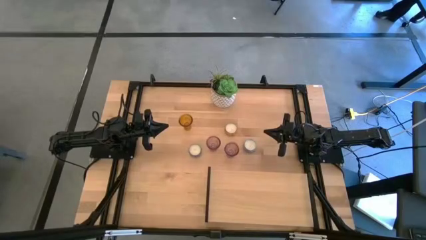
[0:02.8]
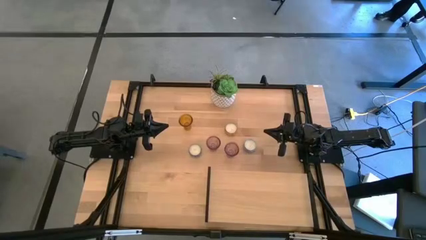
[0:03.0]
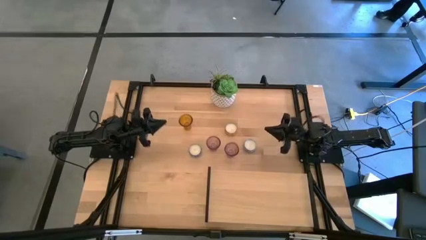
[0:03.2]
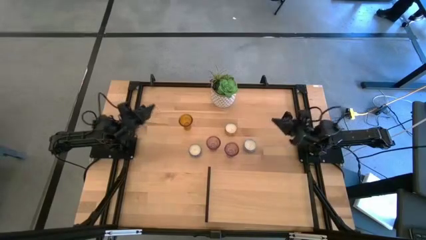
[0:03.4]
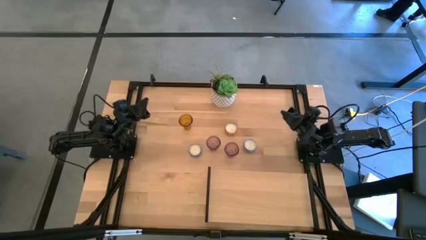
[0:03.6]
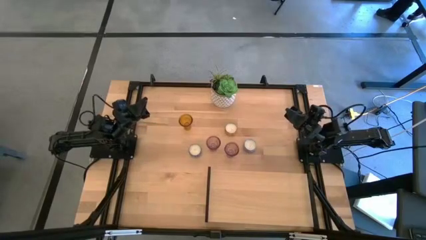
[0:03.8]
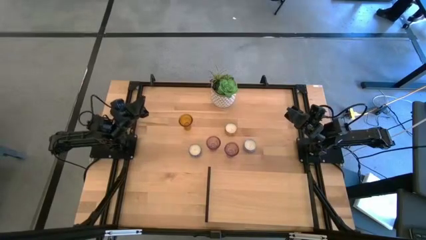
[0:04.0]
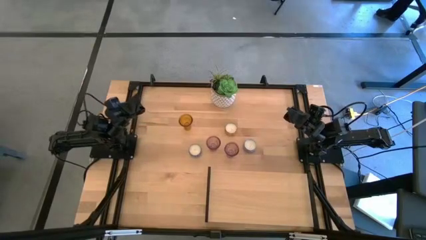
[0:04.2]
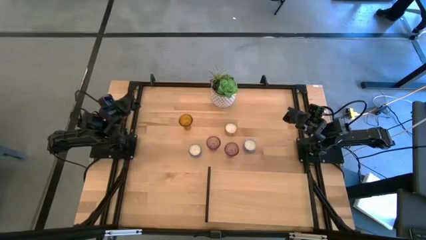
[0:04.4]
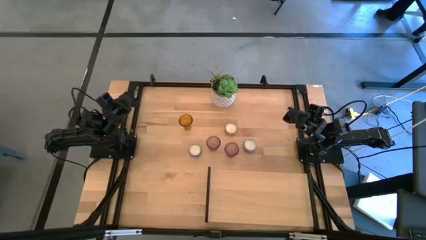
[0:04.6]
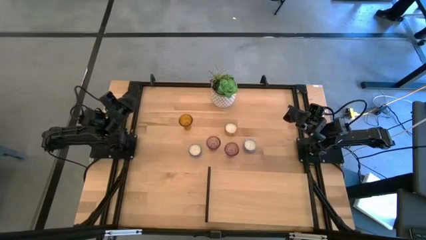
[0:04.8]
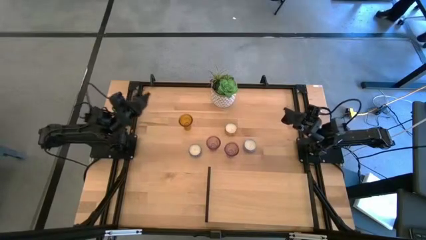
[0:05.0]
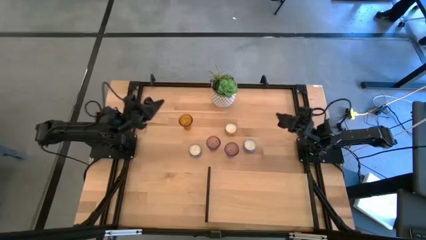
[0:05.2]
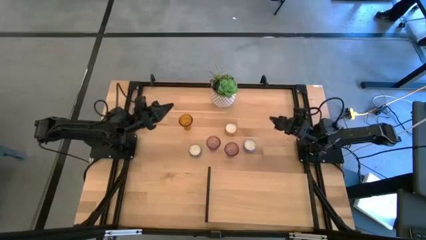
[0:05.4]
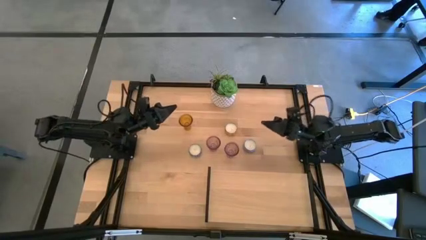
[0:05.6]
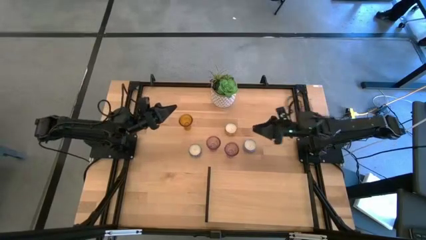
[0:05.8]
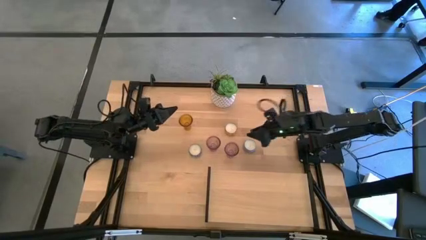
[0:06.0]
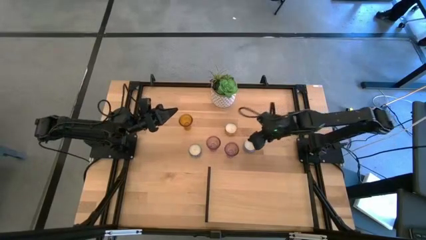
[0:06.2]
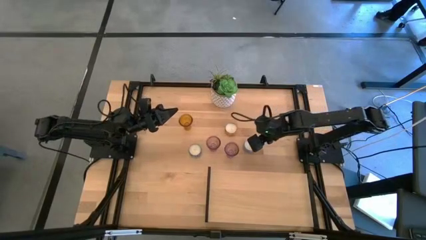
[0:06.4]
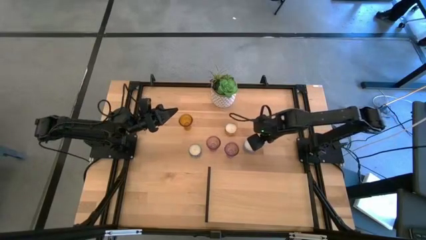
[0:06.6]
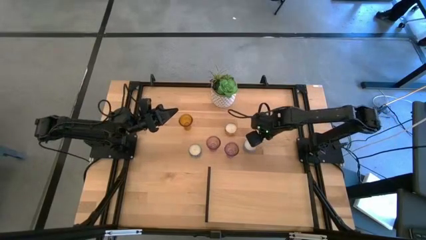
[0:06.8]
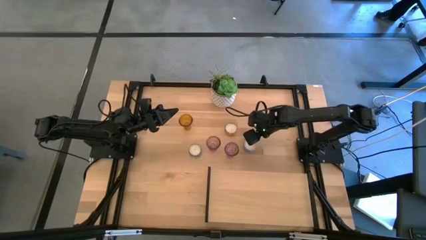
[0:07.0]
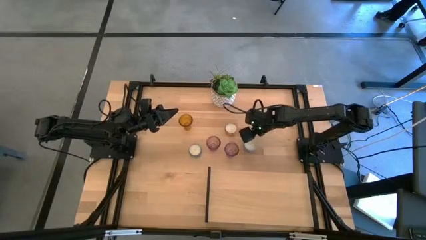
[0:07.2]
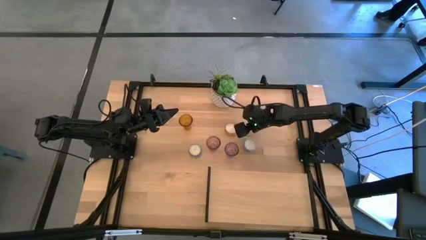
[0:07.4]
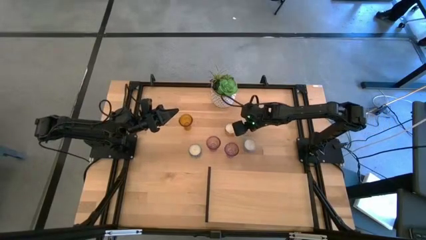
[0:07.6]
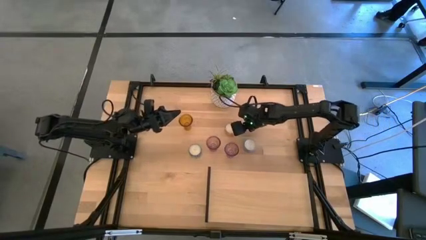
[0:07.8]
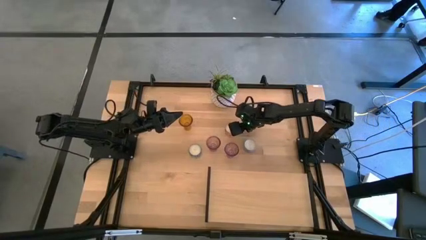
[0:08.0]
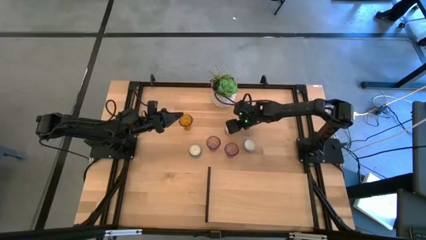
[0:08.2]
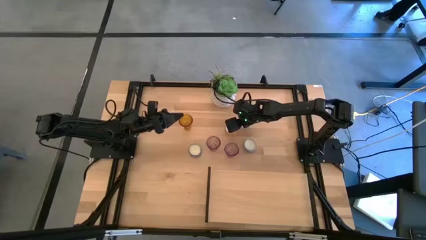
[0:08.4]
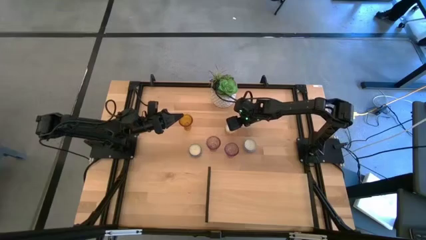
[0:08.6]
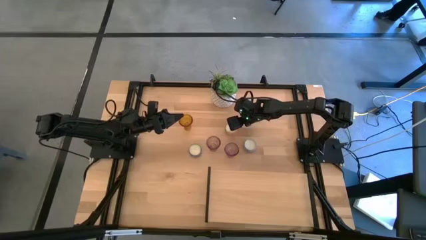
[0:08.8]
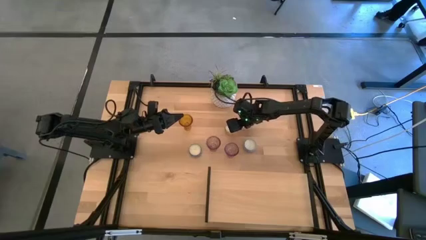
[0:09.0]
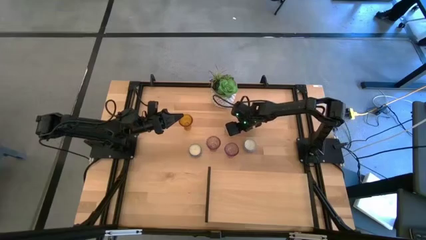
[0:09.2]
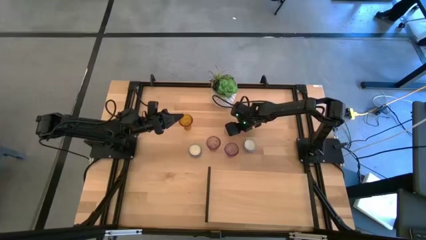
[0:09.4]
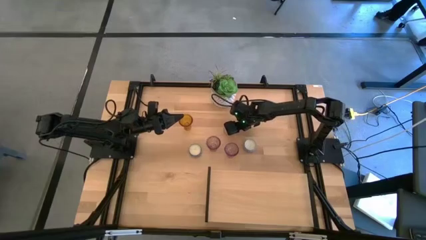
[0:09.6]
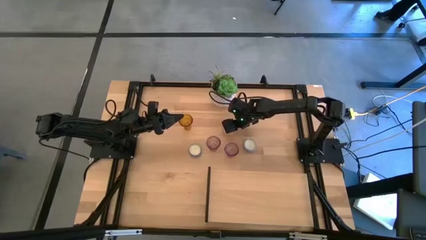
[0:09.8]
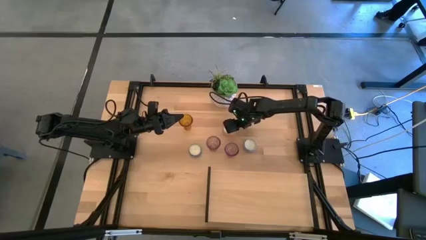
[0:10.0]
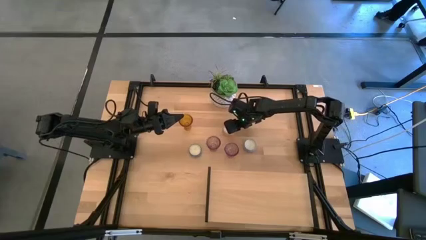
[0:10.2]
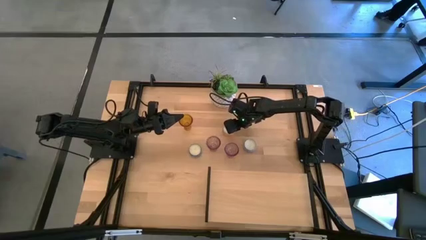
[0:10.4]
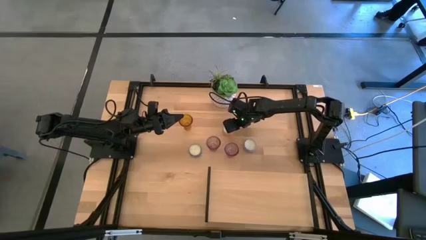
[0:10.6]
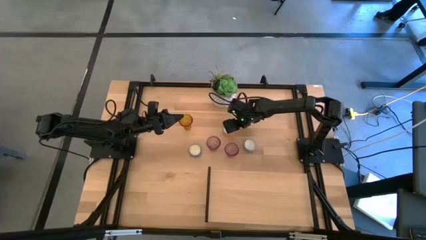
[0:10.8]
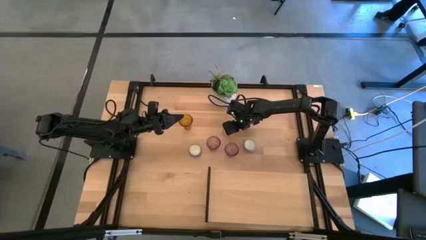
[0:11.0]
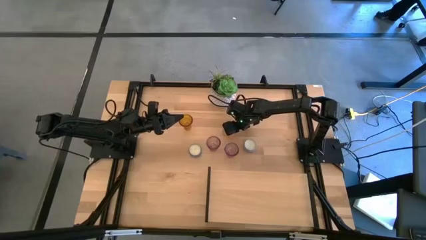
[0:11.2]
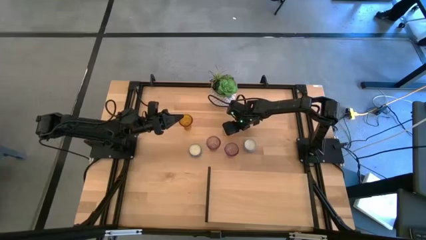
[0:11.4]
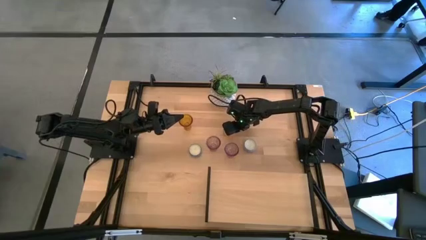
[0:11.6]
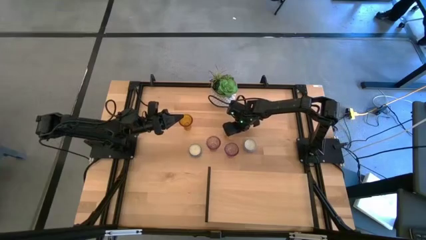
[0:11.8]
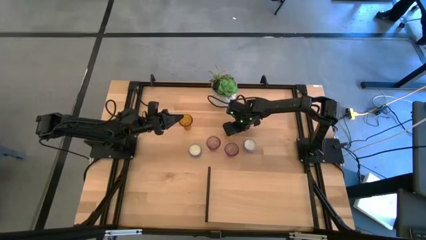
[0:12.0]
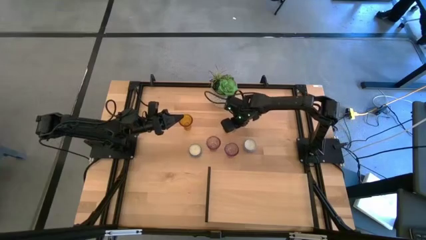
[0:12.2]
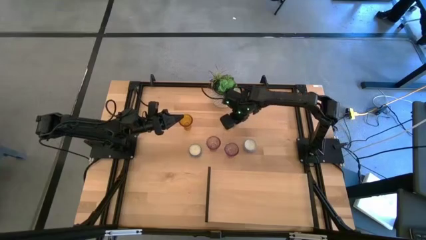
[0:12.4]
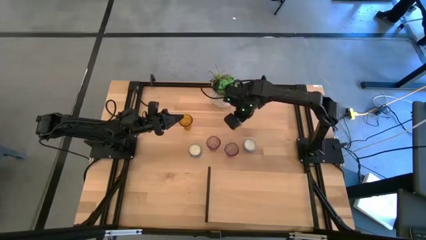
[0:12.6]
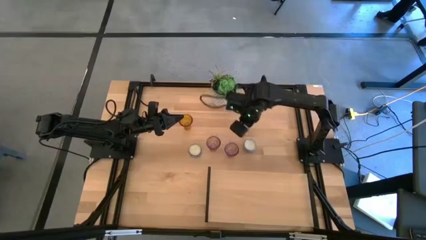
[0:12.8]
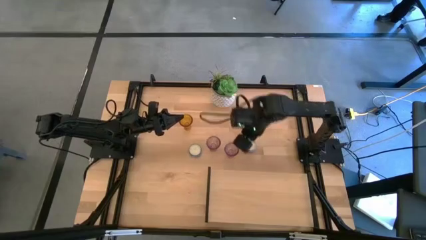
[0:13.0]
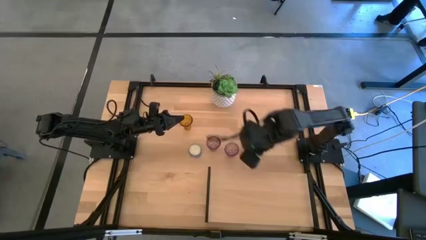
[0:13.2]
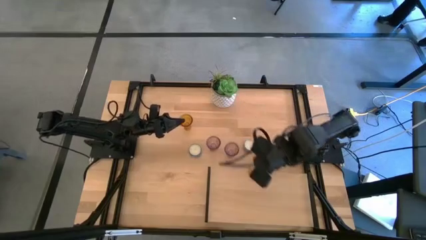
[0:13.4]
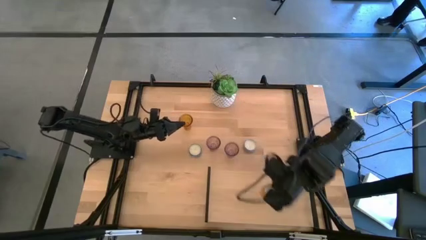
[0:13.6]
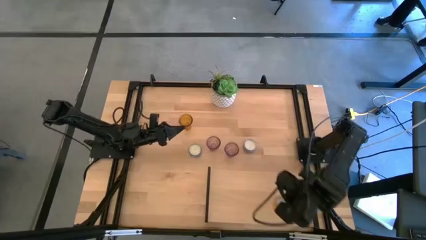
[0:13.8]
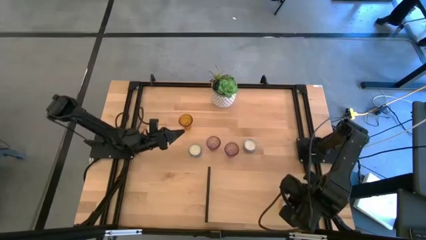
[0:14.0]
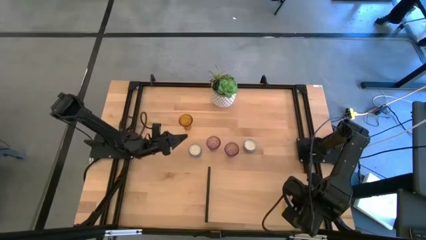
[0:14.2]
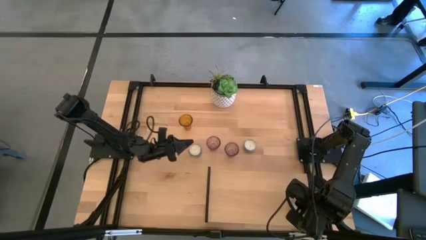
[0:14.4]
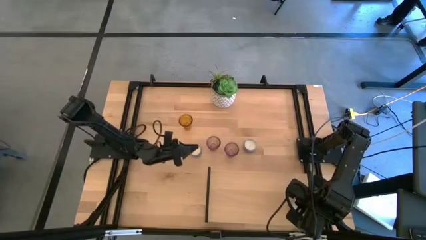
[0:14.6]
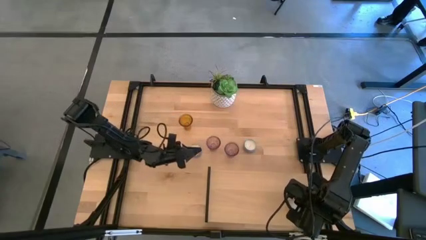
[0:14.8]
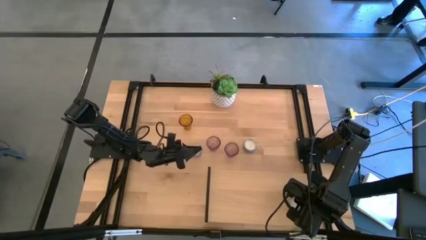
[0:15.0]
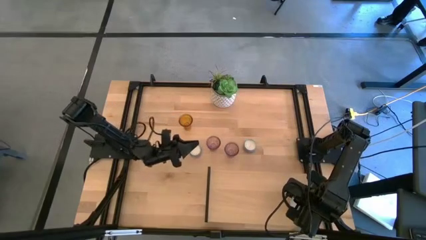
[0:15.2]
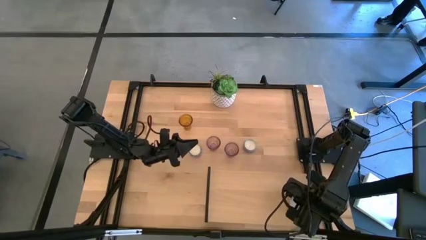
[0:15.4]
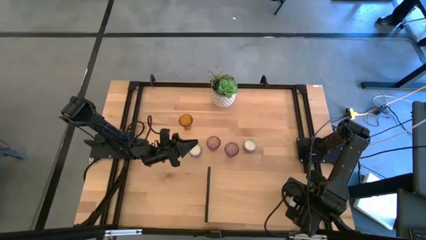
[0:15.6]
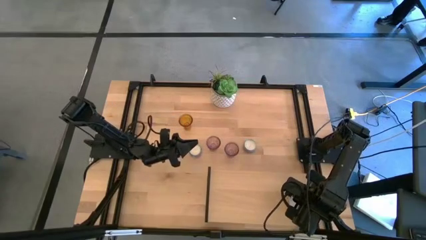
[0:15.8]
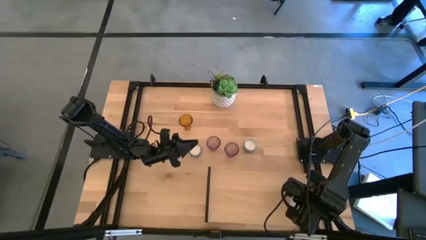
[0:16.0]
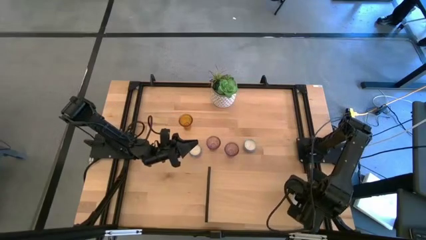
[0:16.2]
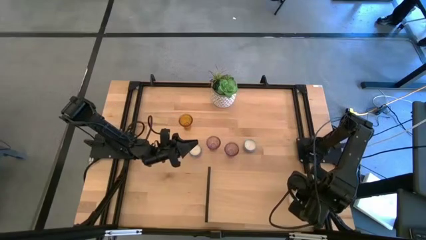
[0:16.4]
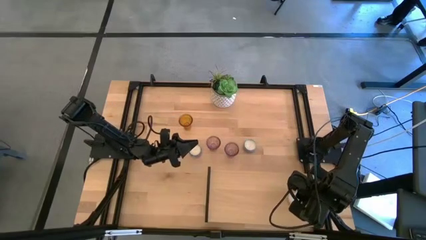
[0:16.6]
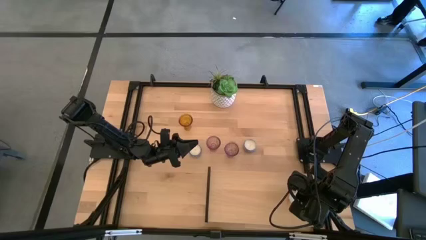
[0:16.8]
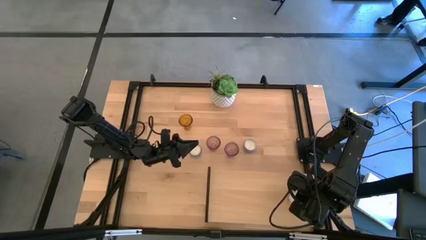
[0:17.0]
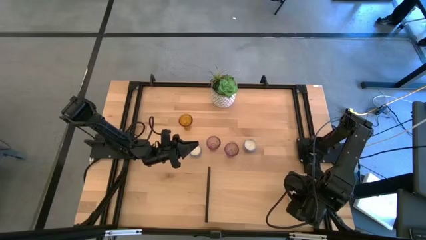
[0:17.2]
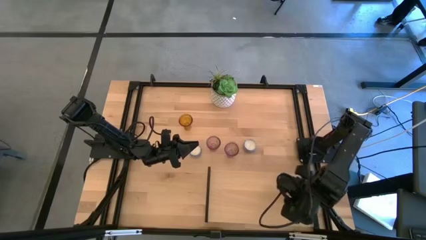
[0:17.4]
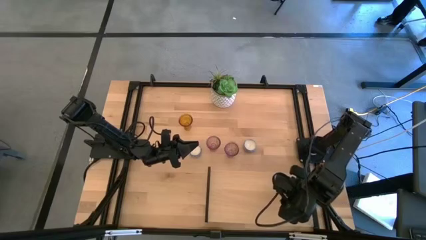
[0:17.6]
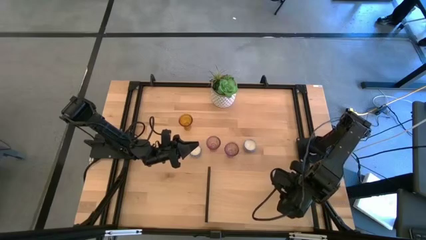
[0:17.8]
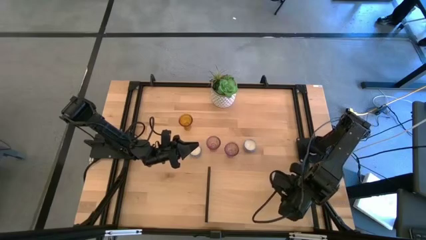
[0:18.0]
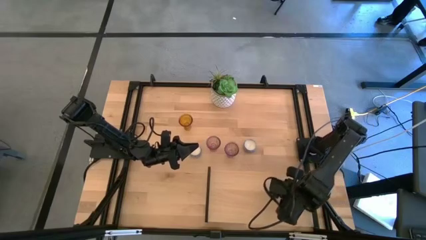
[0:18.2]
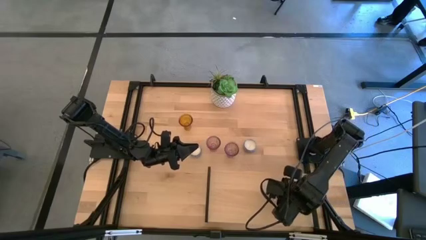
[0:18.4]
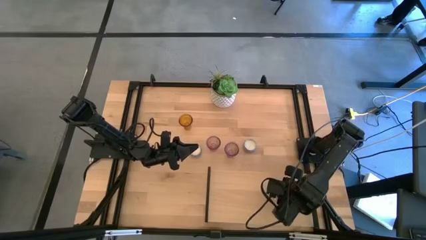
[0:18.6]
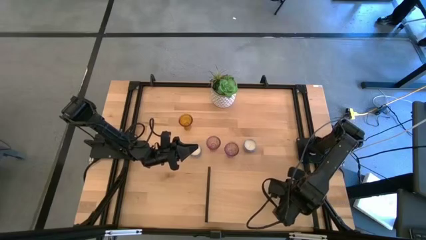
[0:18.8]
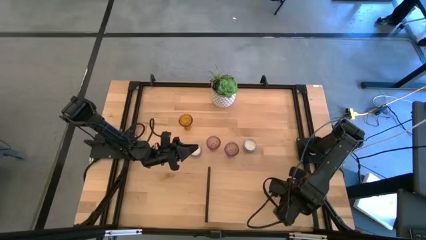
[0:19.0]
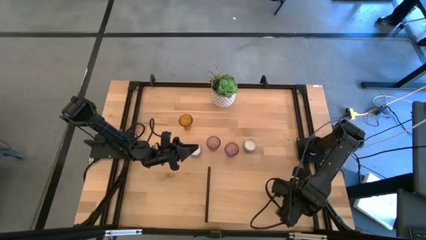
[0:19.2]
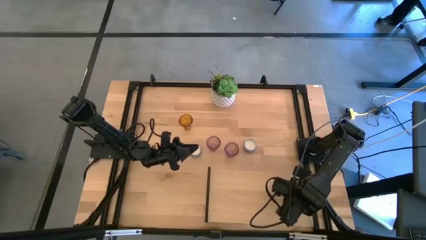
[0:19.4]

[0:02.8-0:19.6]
Task: Pick & Place candle stick holders
Put the yellow scented candle on the shelf
